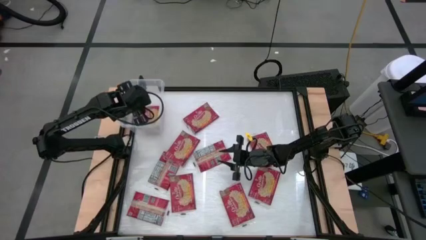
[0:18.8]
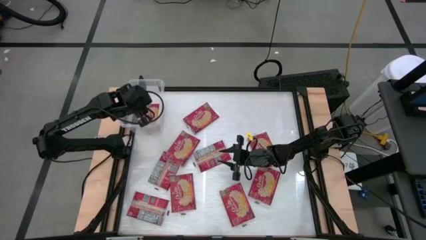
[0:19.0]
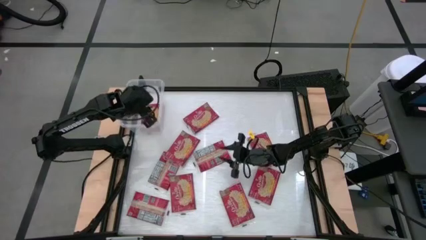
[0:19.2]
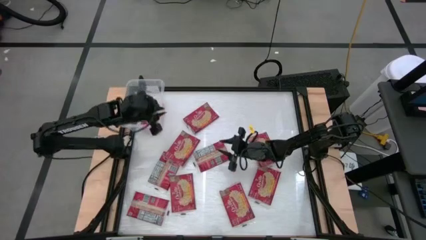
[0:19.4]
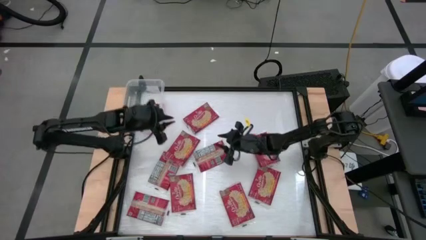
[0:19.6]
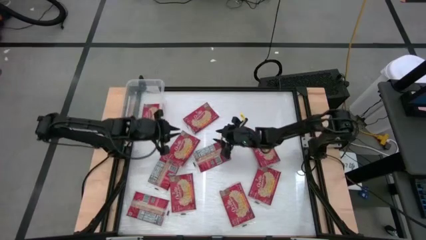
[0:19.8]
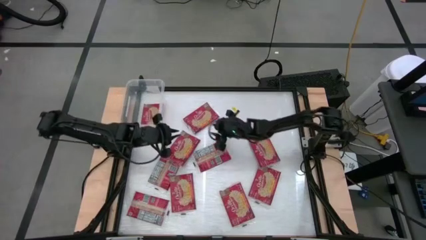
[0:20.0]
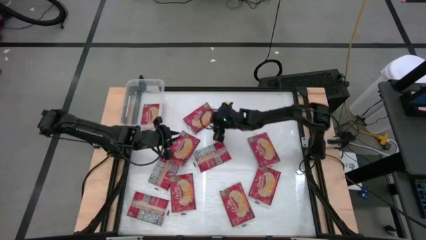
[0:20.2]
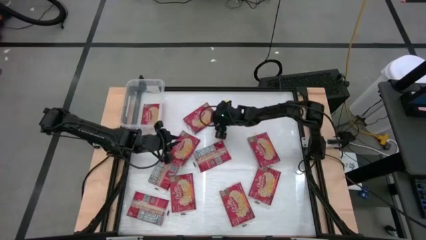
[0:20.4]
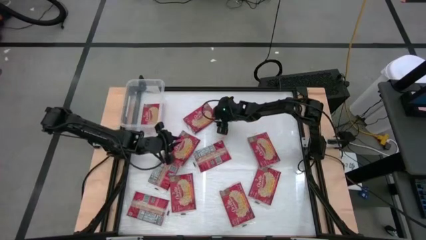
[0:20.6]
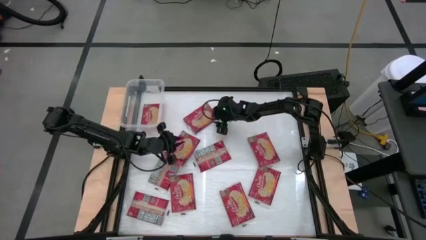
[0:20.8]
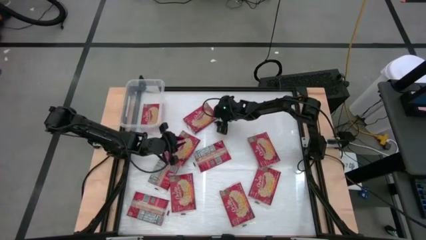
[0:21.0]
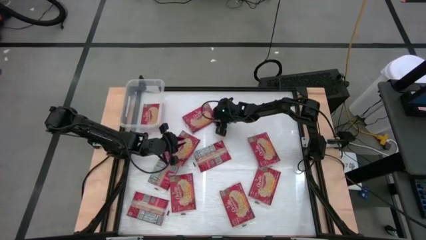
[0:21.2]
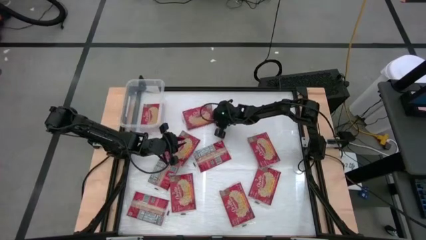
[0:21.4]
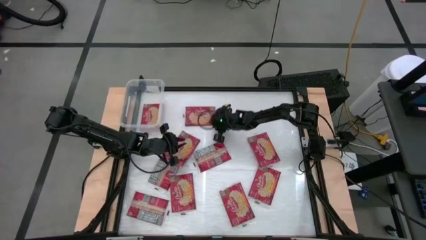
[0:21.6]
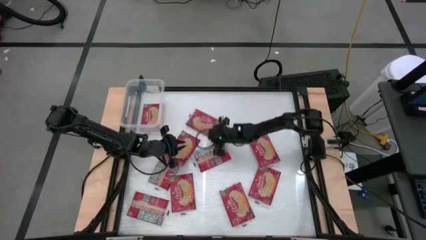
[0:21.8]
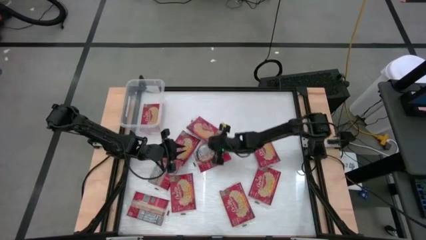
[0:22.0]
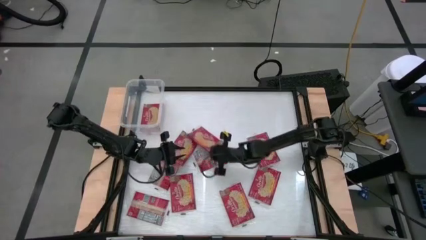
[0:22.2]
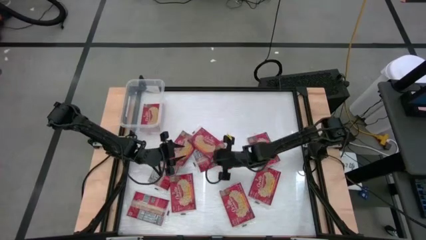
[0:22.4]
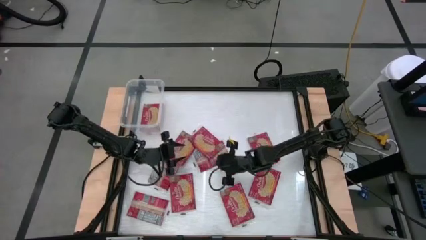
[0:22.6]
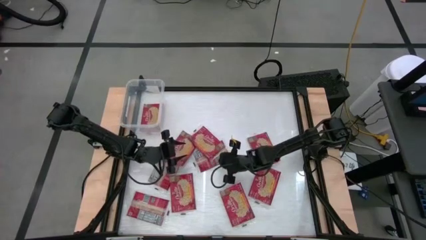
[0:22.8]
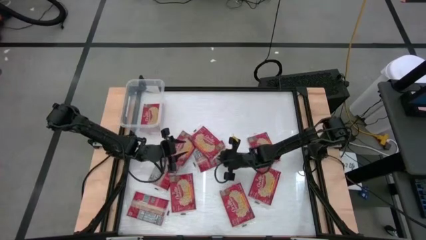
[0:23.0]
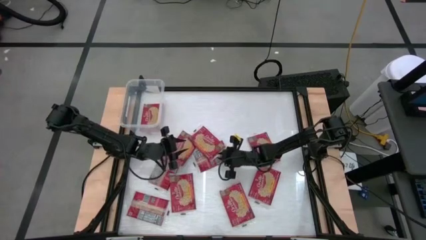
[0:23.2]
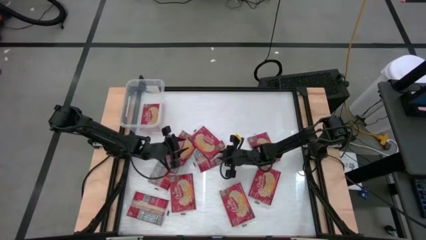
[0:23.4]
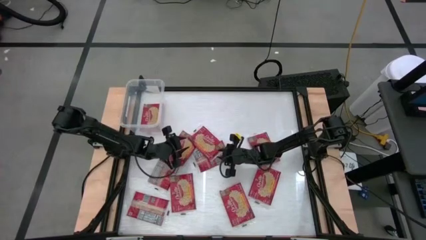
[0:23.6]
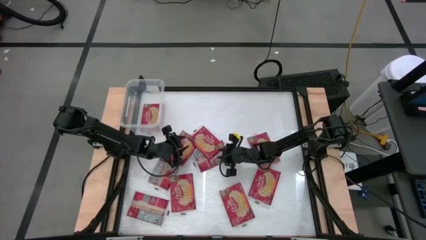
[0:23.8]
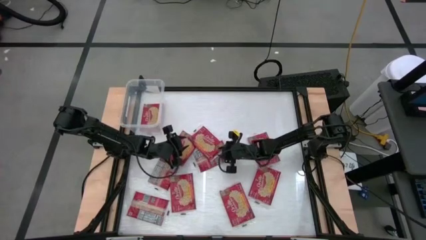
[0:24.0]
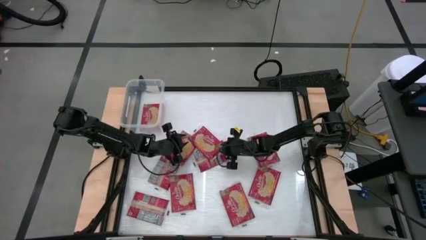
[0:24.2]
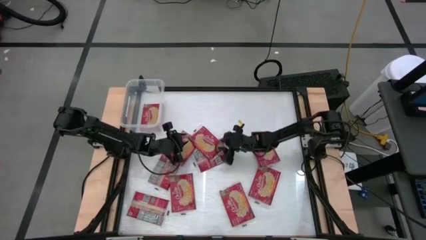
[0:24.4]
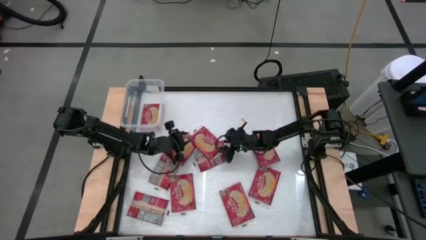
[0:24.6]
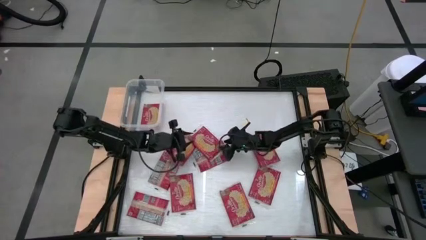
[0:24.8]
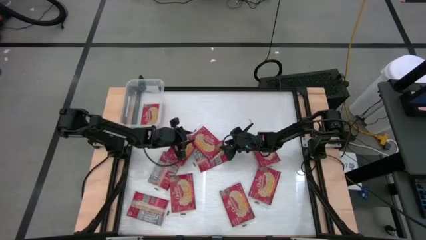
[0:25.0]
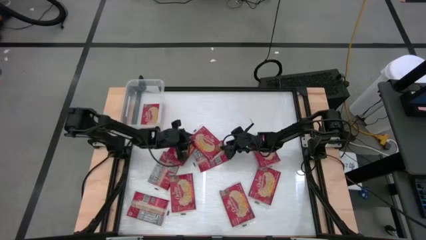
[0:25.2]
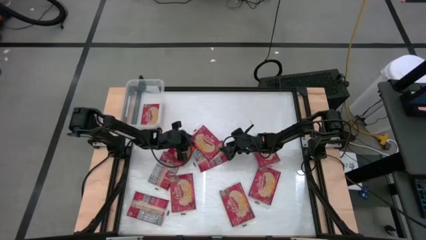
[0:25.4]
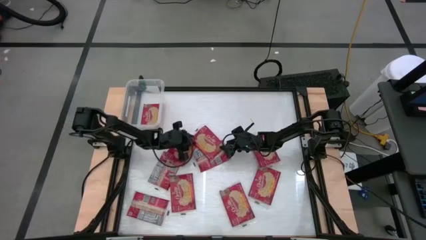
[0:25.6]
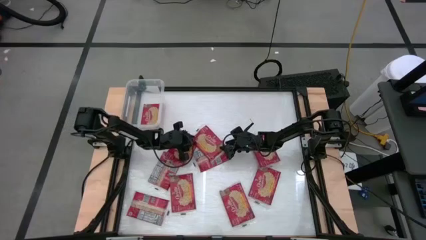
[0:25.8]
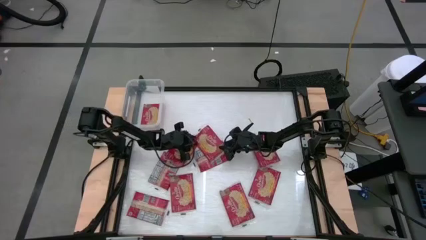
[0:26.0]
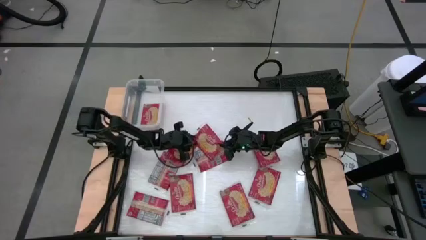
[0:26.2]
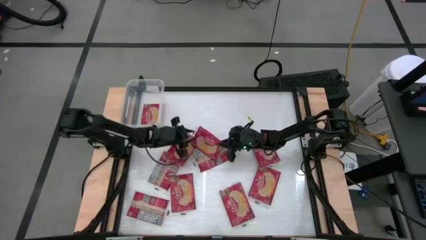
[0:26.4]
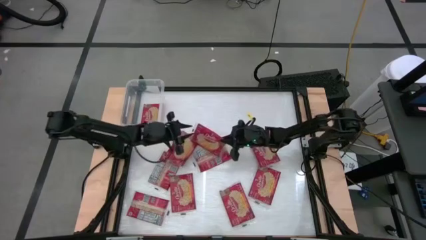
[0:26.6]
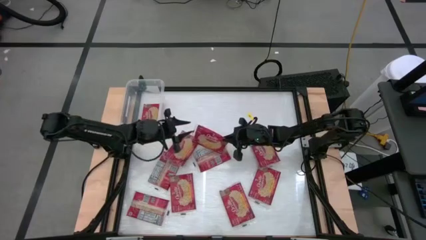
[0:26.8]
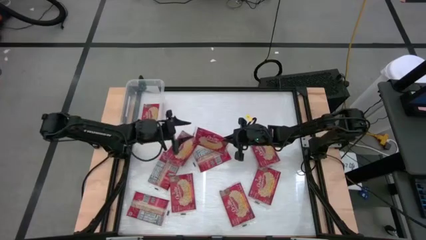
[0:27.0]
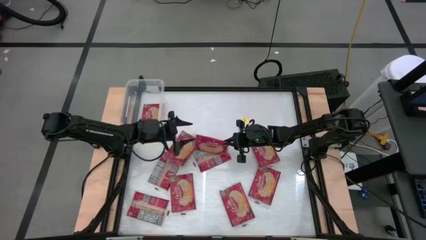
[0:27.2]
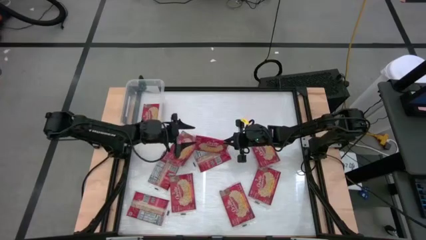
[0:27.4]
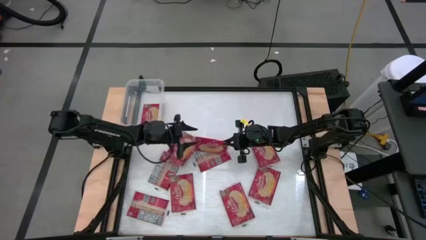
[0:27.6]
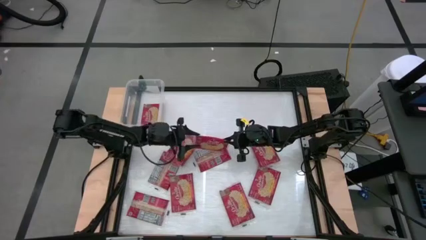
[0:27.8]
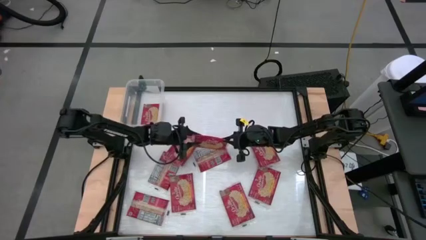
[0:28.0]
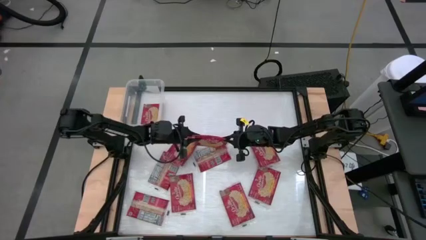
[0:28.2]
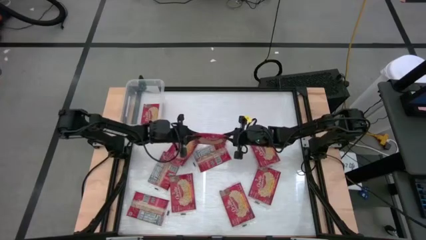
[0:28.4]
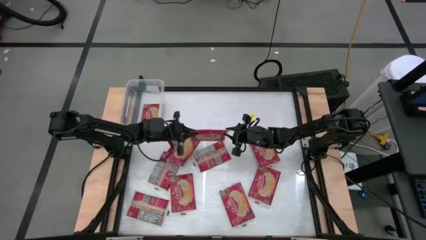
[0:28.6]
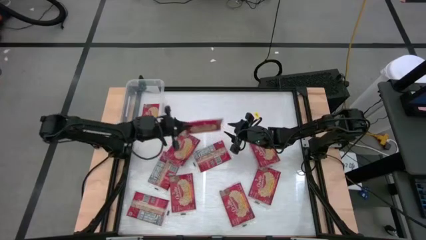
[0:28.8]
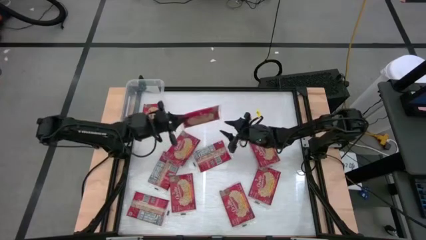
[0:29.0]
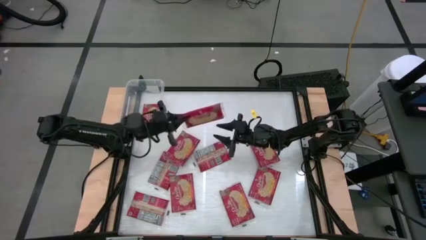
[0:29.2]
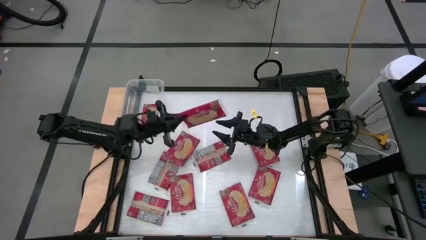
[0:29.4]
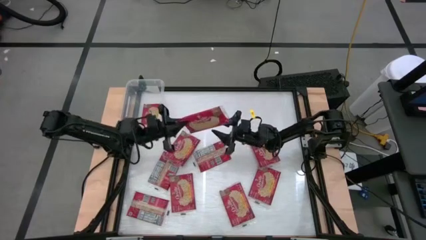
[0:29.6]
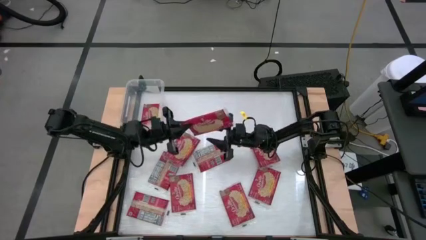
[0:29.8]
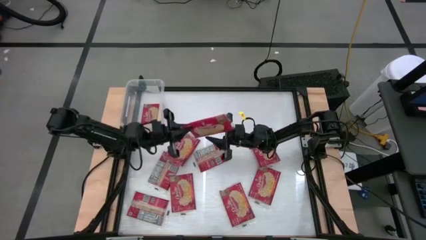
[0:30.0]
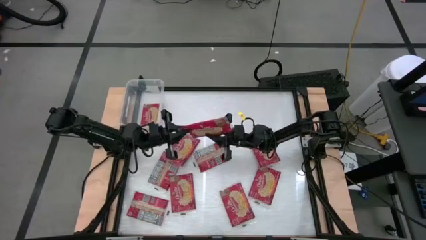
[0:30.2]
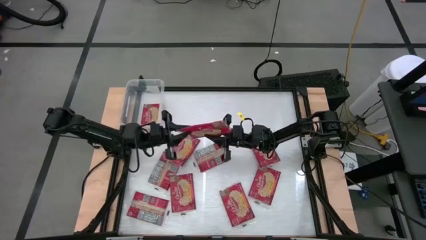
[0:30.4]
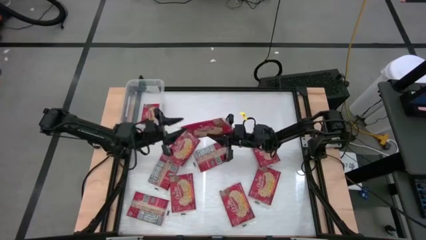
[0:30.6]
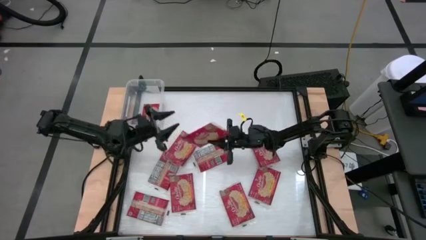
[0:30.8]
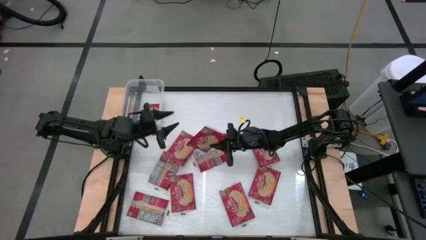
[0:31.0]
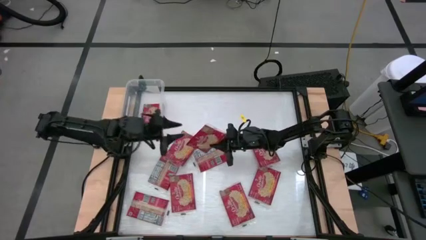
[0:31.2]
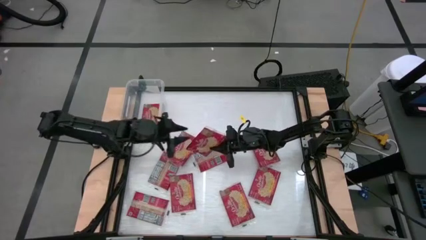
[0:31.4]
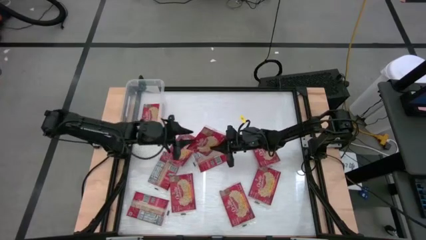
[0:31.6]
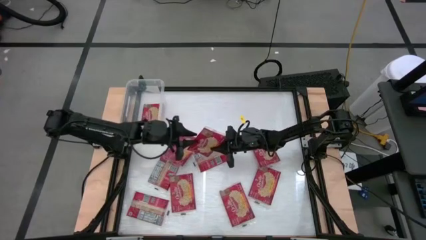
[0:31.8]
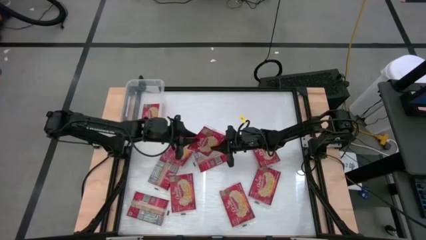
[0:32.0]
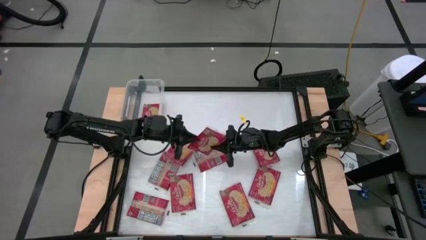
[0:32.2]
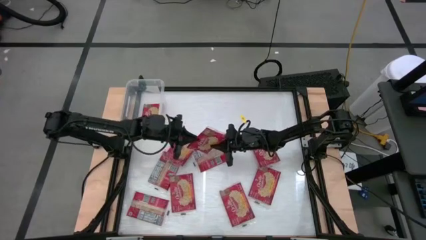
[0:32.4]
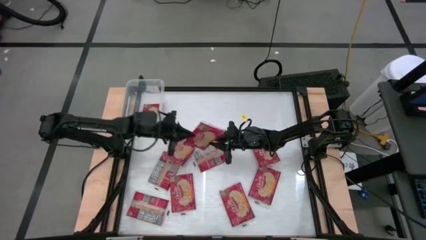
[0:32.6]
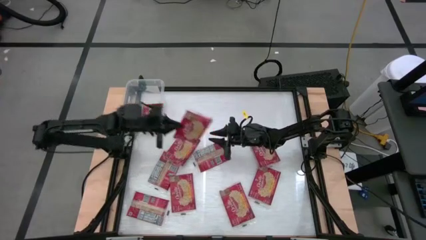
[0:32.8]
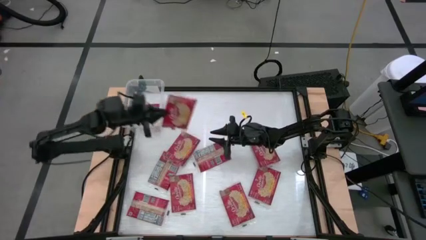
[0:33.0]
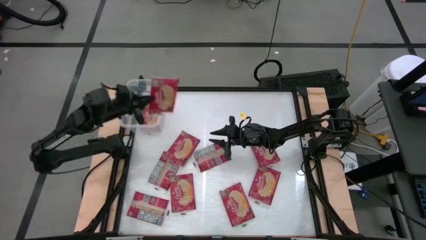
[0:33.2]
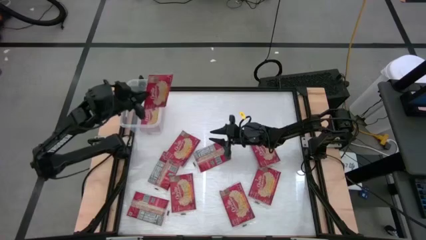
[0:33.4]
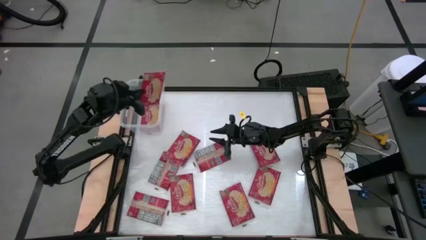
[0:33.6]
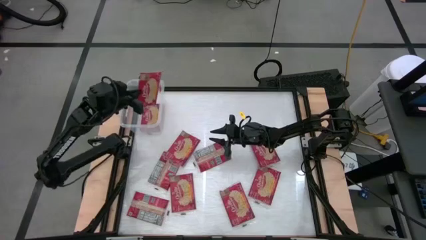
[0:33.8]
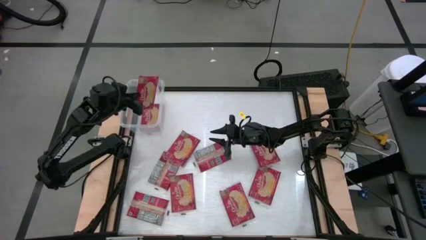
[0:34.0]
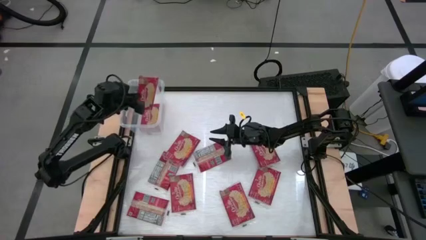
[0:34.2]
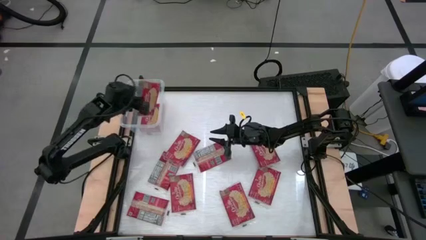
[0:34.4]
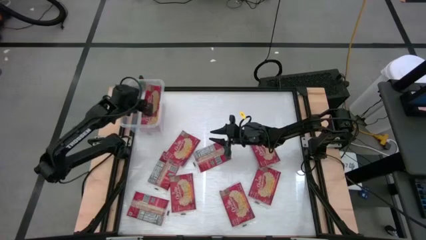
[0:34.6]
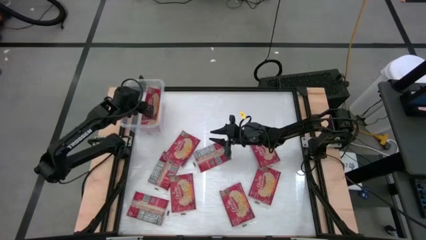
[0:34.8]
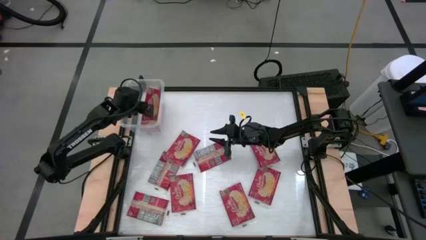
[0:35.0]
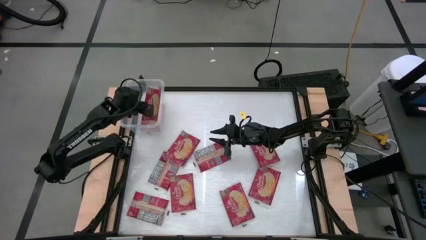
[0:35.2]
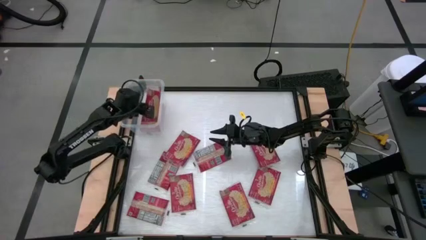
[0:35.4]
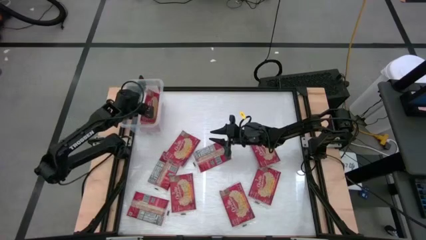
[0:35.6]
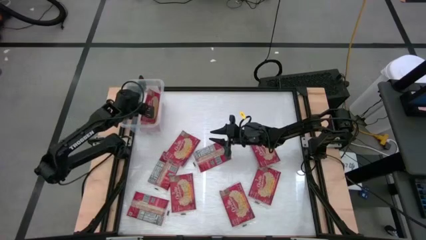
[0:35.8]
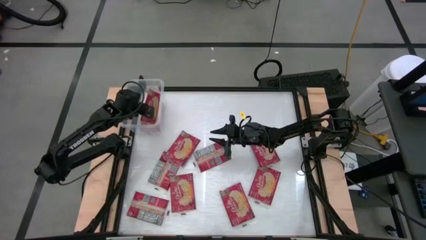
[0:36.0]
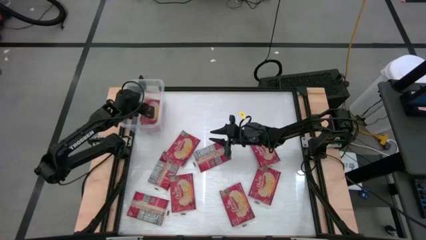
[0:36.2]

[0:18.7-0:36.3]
Task: Sort popcorn bags into baskets
Stack the red popcorn pack into the bin
